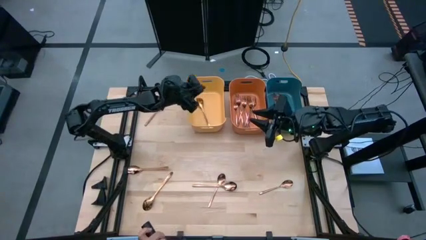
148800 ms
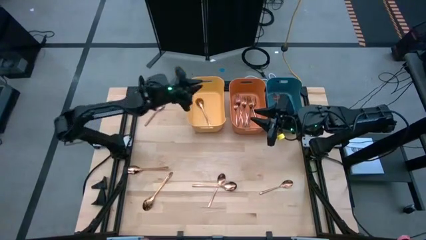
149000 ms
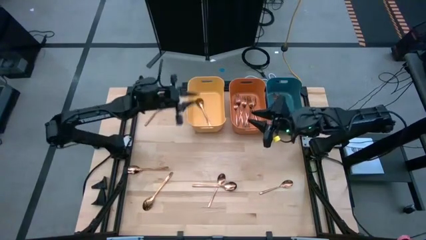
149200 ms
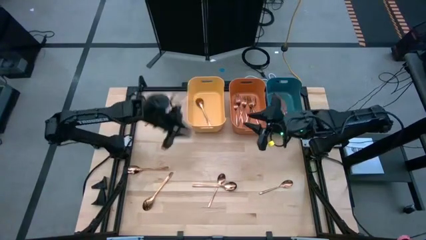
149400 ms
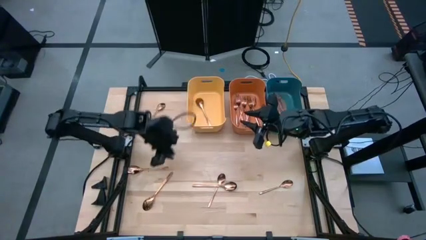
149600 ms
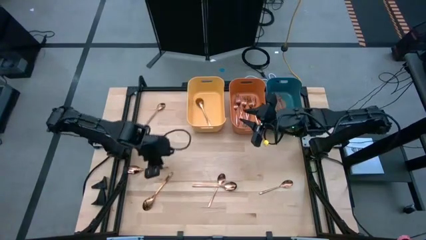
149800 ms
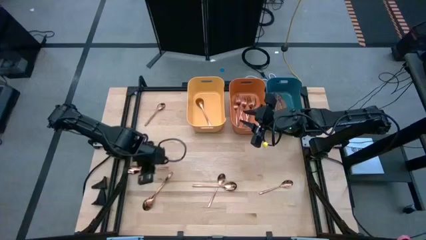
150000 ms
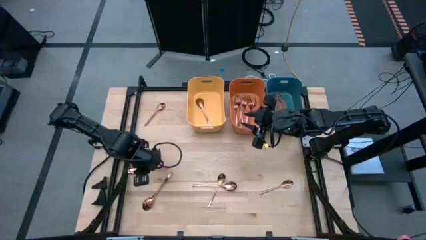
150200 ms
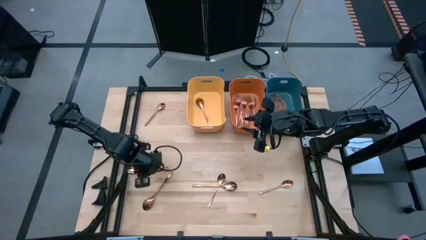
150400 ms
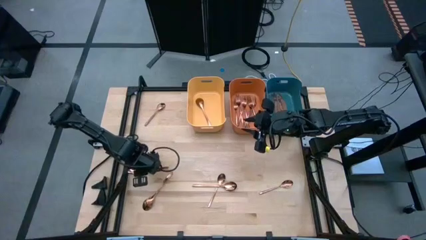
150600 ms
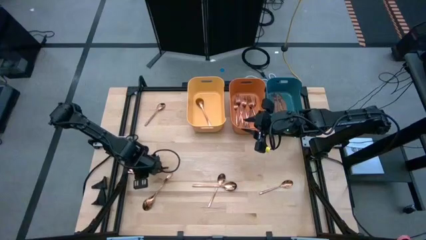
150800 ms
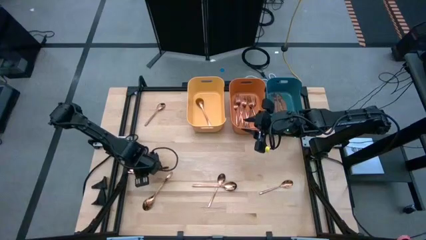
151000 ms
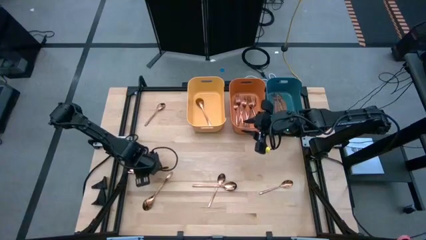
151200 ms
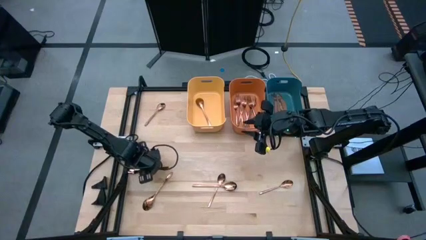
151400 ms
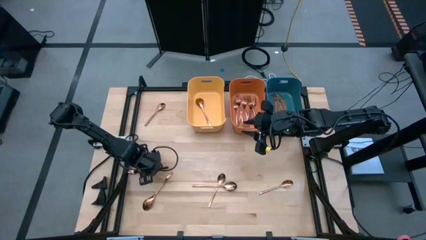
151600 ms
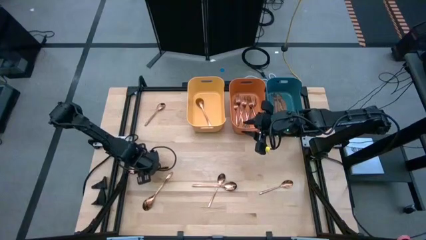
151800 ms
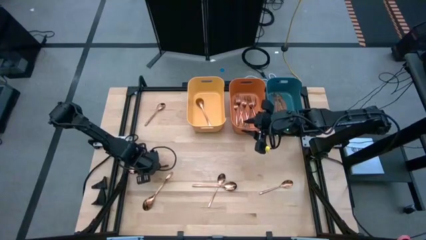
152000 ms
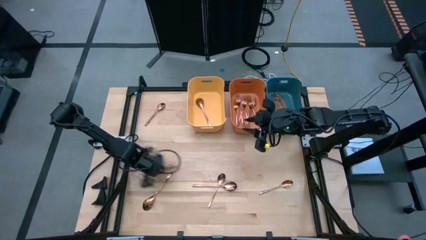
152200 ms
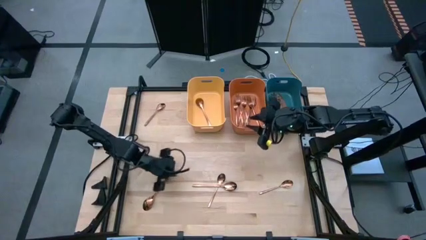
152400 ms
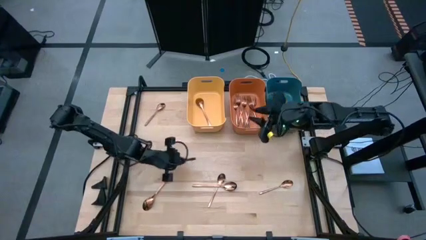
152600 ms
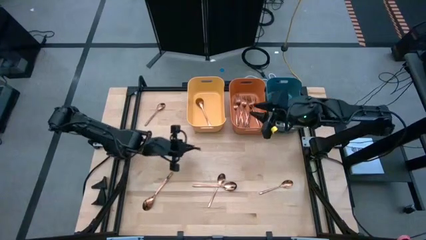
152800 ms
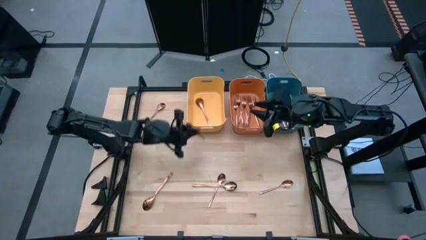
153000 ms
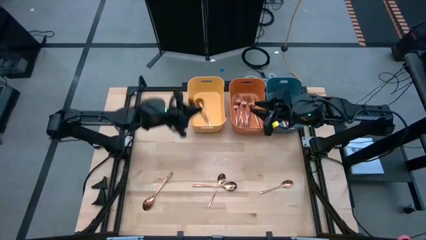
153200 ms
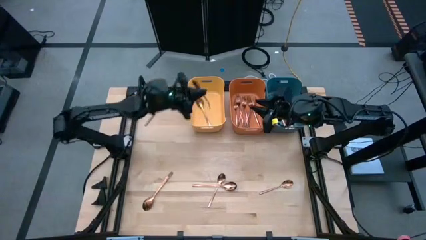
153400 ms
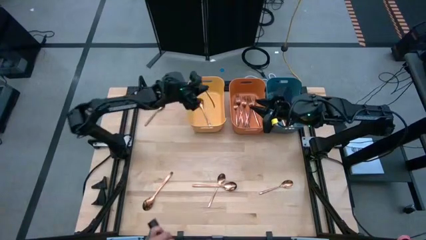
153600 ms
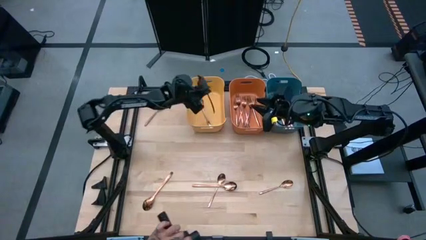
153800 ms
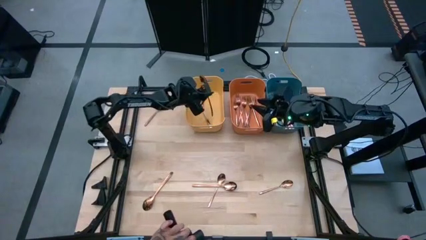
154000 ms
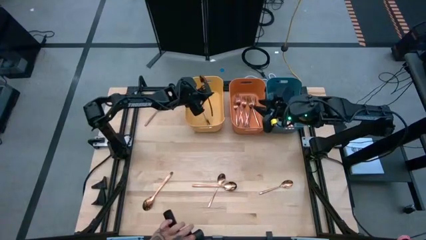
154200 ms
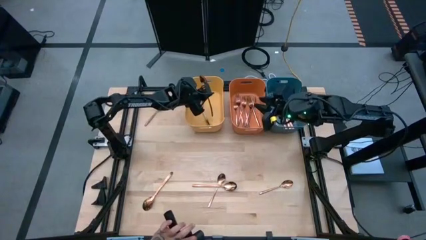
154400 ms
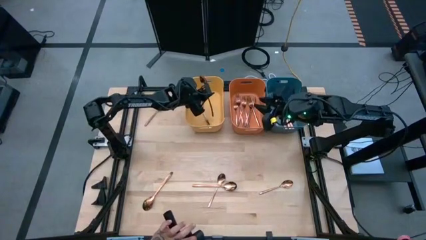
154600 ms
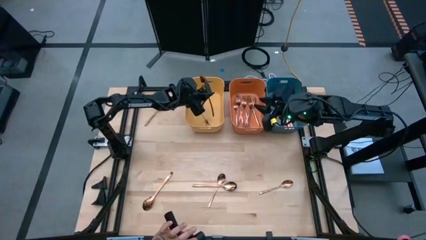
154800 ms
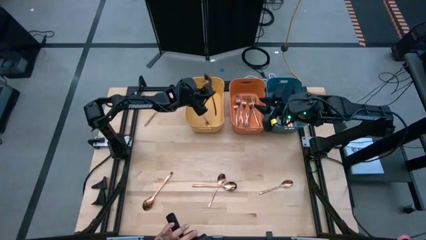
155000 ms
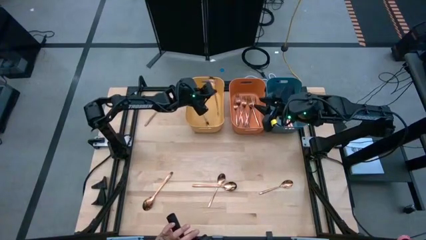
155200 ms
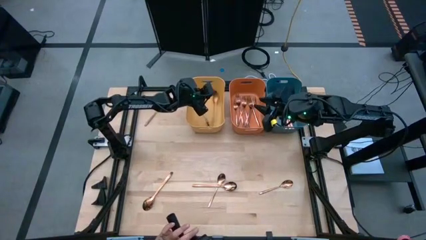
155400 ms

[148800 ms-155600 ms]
Task: Sort silverware
Put the copper spoon into the yellow bin

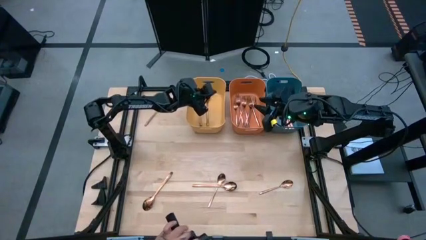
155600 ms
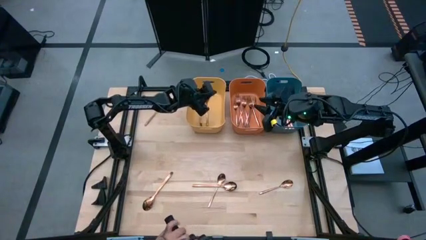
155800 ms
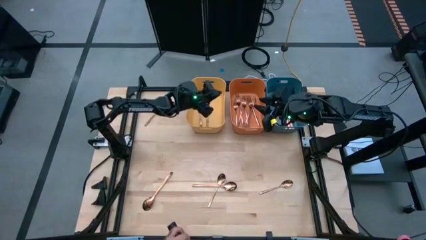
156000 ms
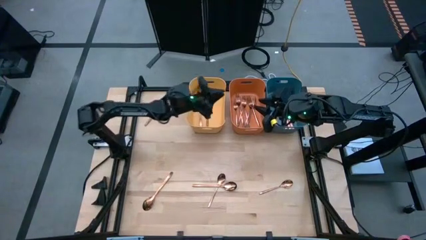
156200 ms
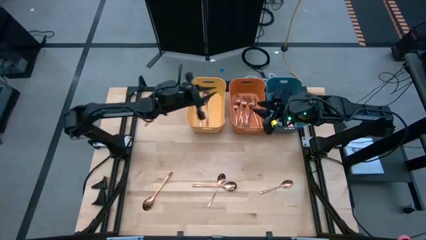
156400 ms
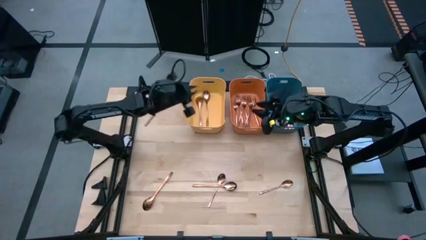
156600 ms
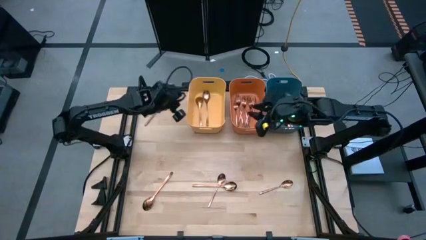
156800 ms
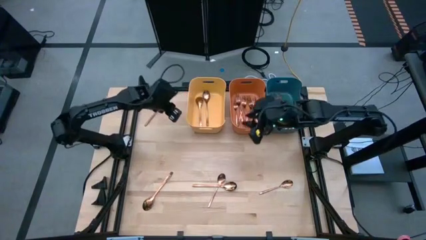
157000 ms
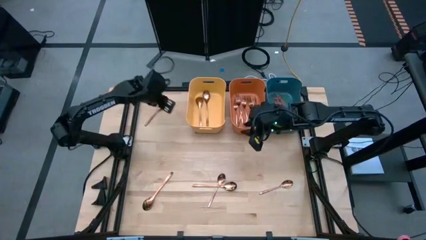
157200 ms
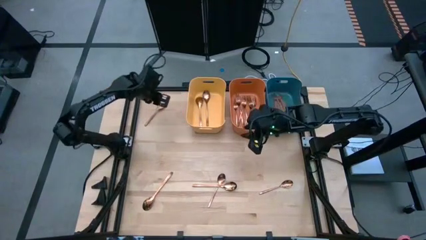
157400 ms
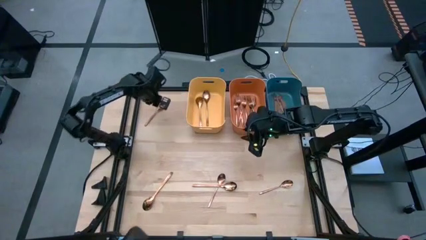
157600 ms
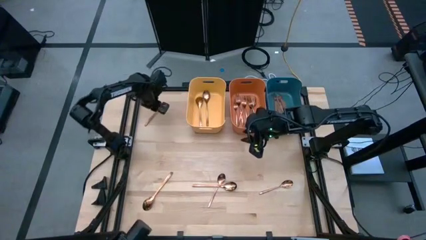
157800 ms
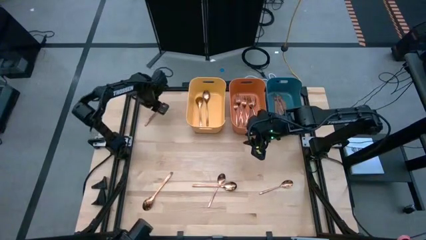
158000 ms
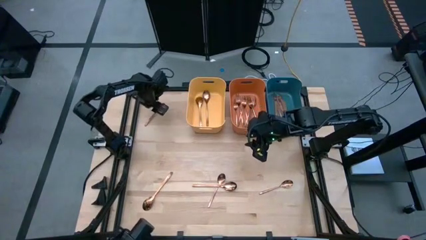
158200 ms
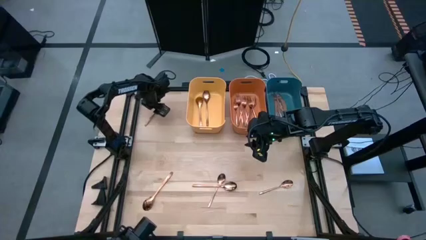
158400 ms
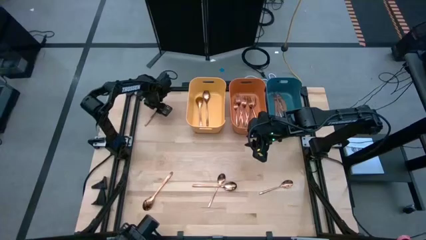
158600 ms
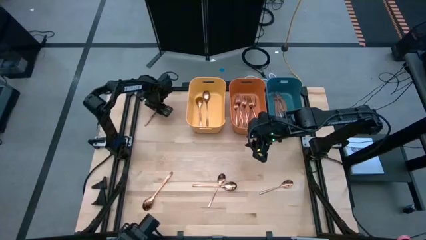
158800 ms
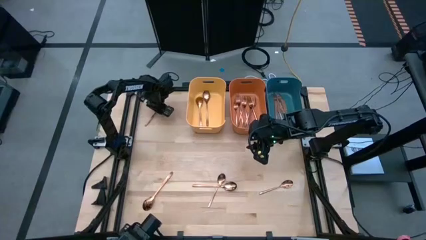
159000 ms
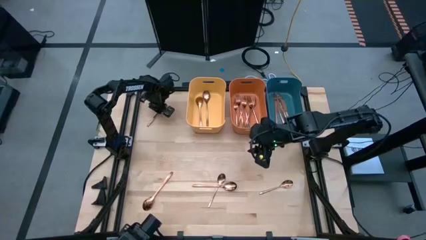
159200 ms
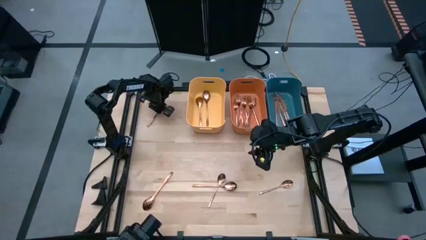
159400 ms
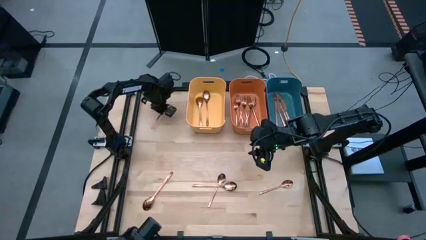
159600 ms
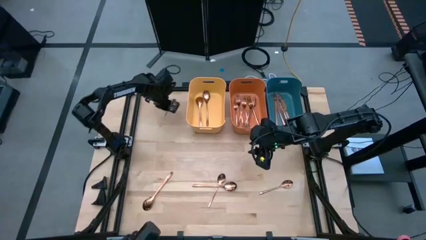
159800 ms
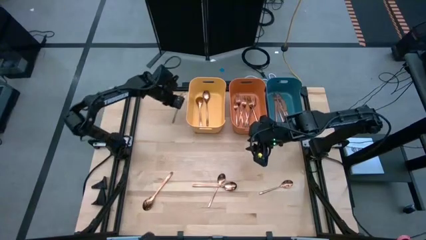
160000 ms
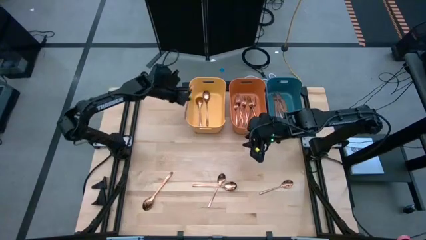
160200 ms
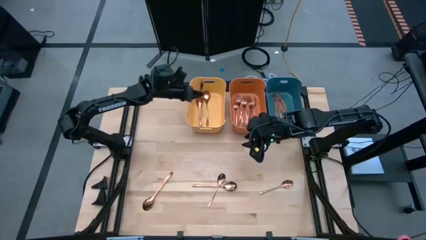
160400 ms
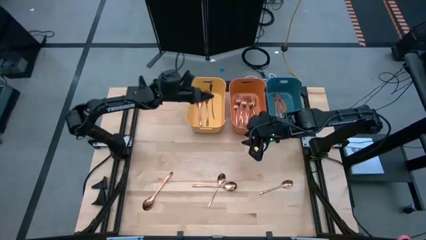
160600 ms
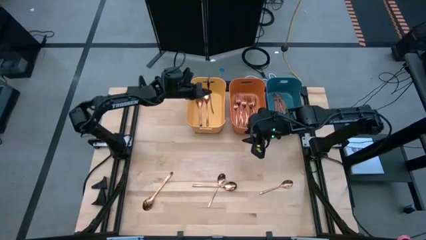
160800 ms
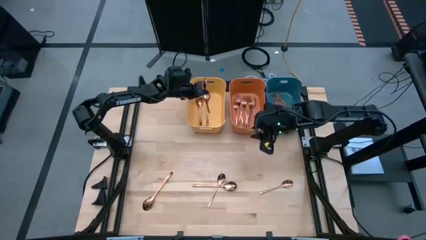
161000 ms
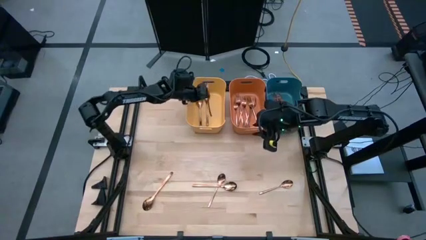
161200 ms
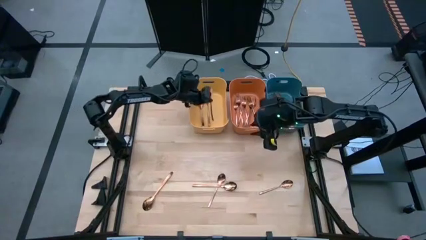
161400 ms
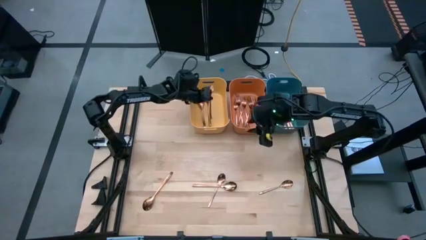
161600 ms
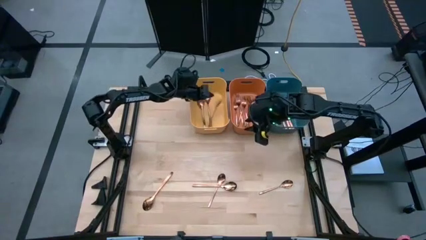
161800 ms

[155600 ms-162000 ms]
Put the copper spoon into the yellow bin

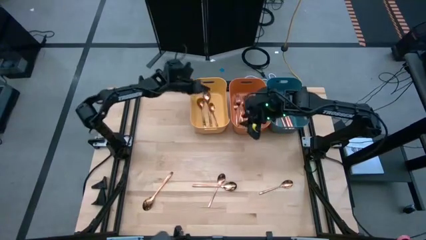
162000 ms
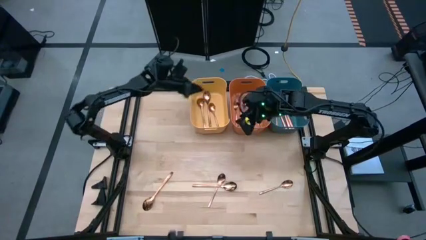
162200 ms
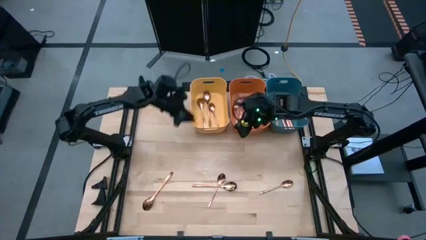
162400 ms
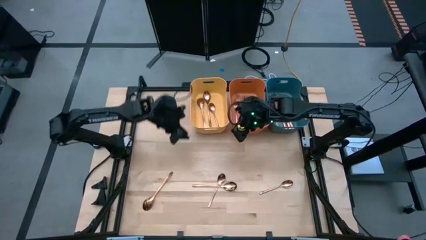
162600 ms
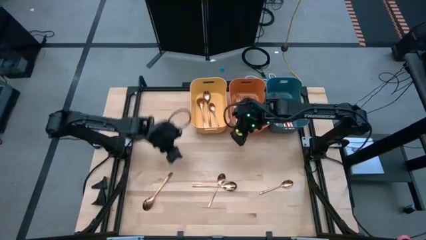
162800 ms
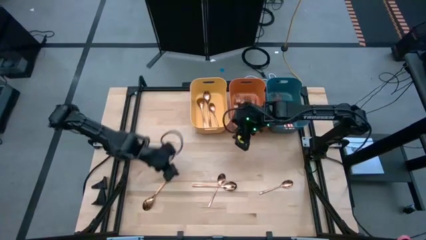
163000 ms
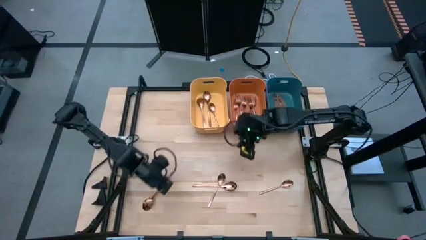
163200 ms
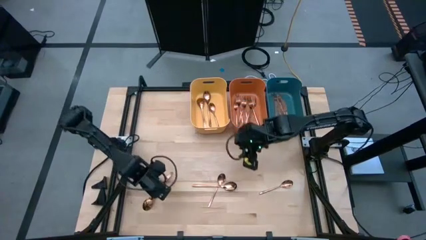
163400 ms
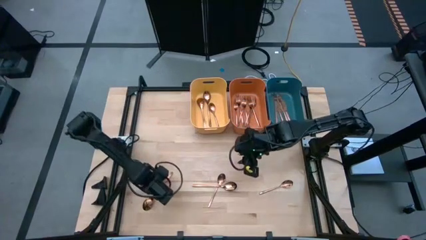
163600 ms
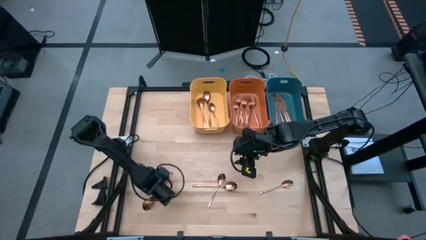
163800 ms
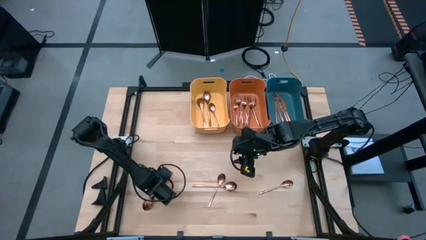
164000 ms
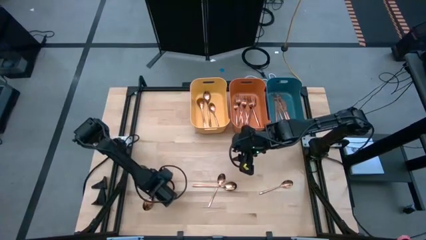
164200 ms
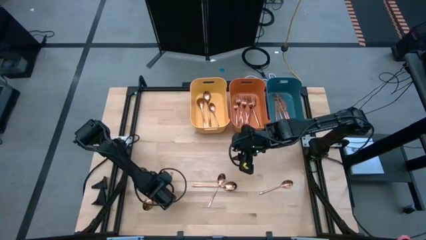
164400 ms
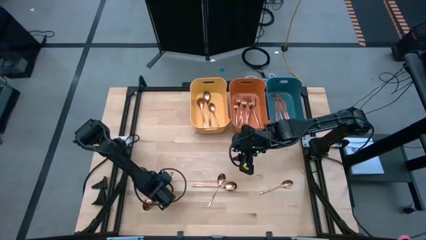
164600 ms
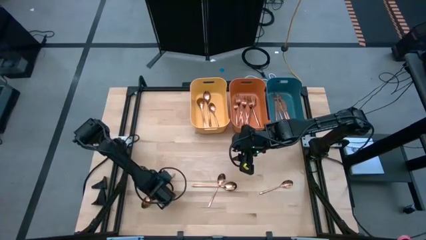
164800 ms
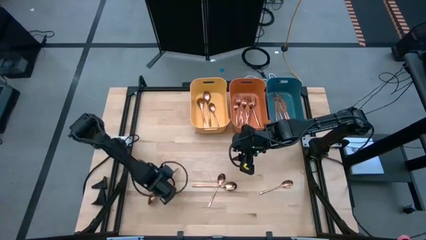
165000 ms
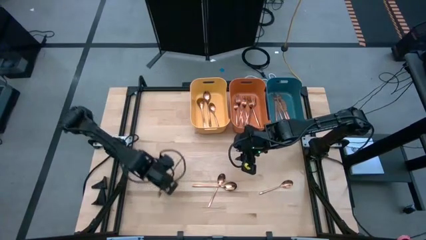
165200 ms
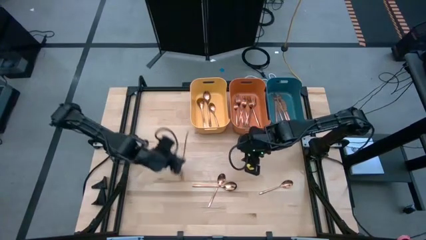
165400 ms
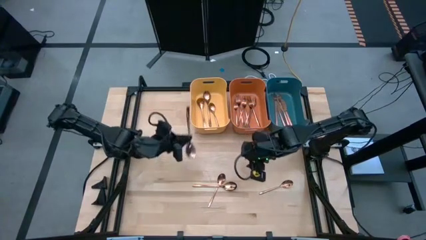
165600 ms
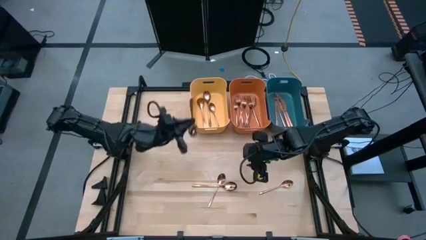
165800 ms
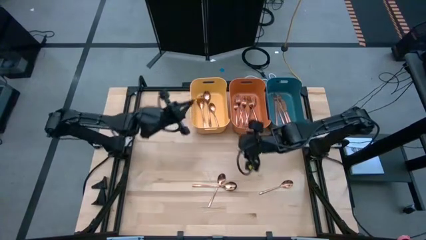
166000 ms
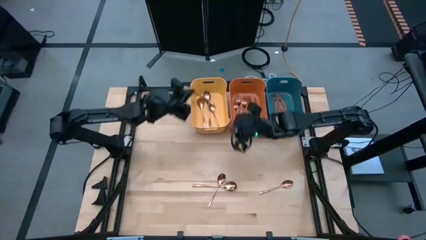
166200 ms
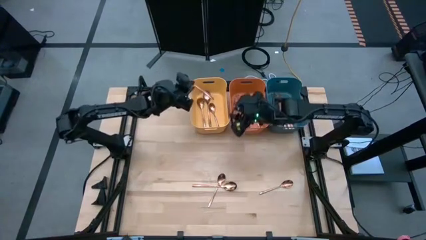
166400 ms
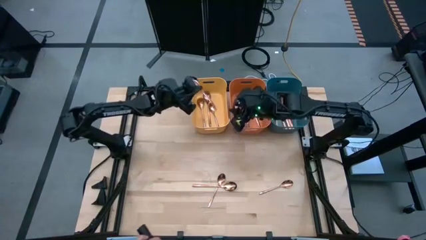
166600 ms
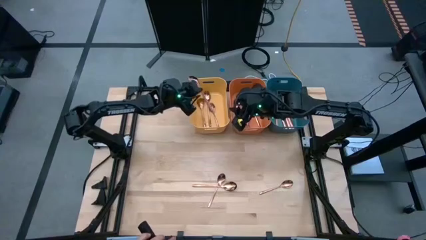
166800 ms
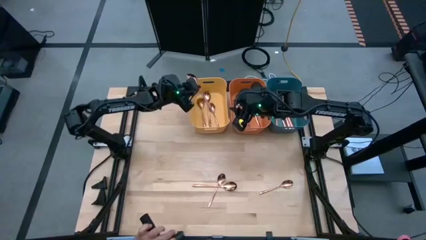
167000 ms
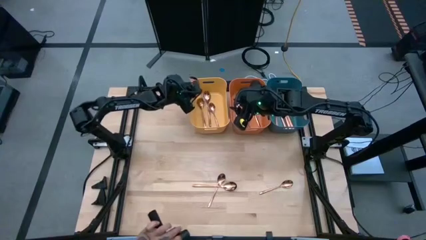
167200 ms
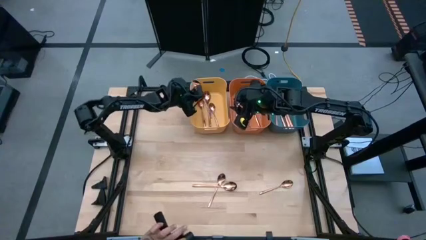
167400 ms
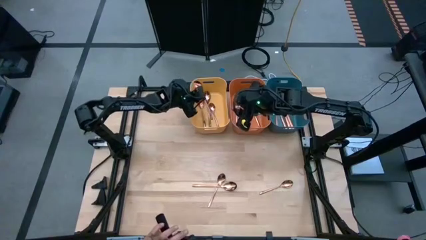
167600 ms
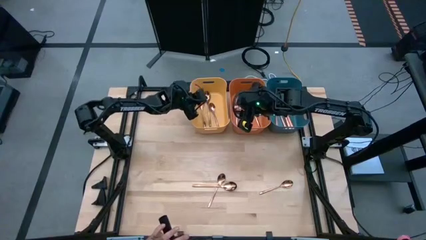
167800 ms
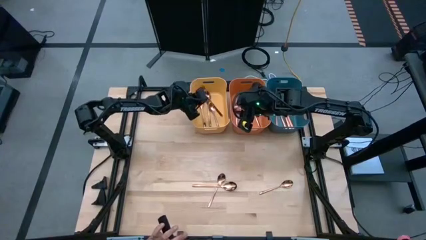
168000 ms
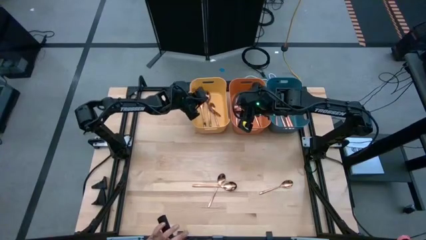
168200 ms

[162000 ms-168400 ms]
Put the copper spoon into the yellow bin
